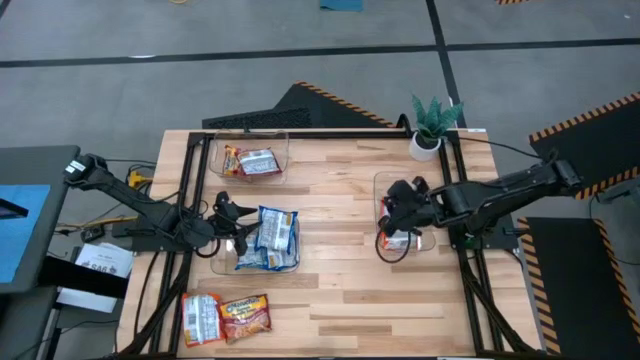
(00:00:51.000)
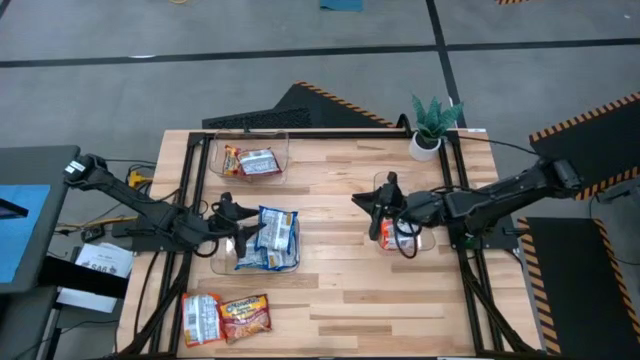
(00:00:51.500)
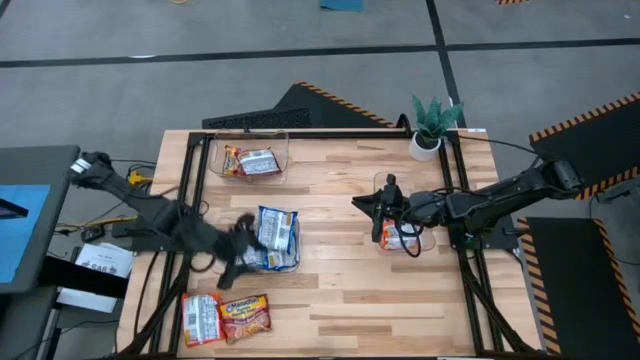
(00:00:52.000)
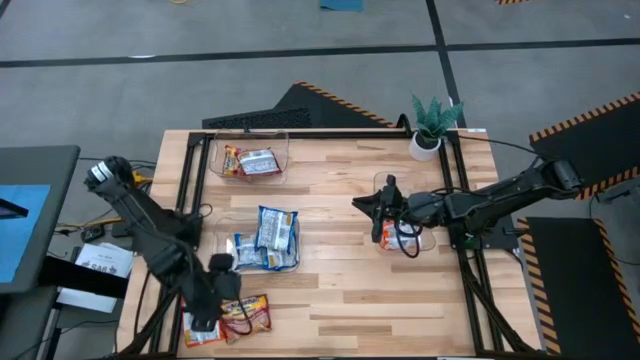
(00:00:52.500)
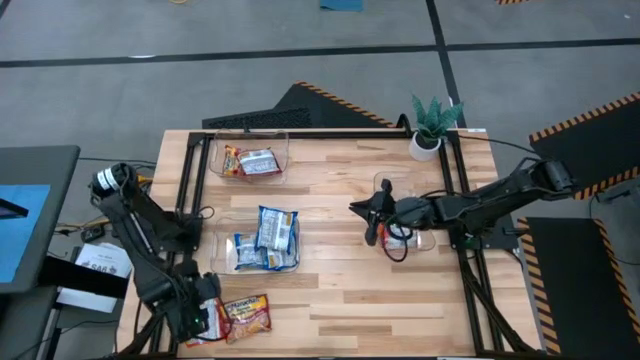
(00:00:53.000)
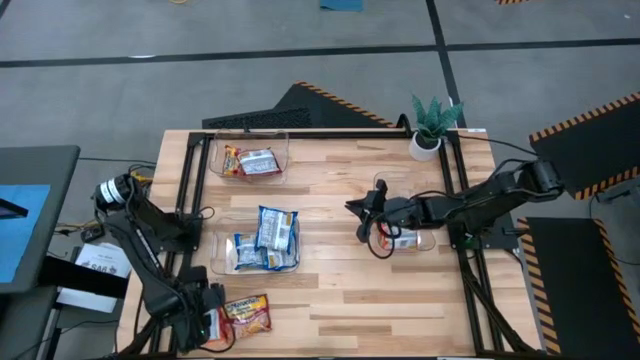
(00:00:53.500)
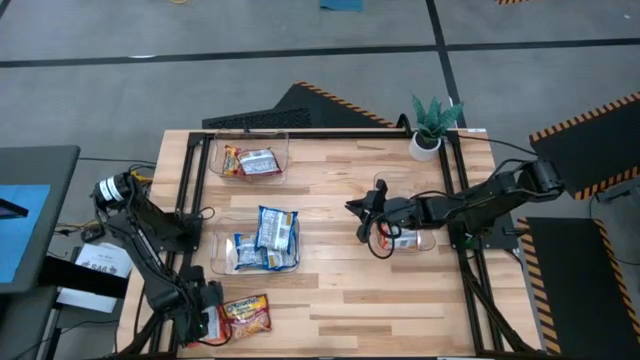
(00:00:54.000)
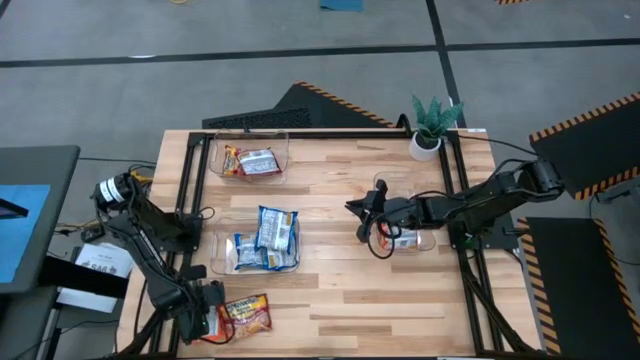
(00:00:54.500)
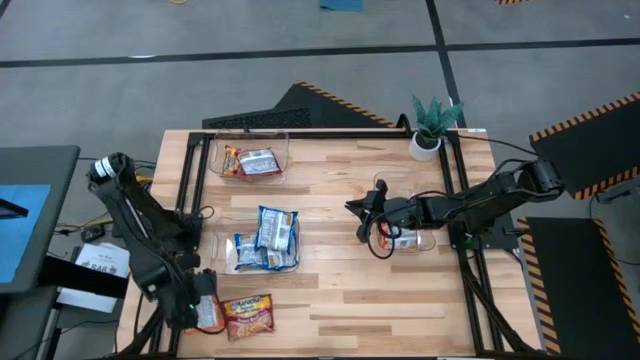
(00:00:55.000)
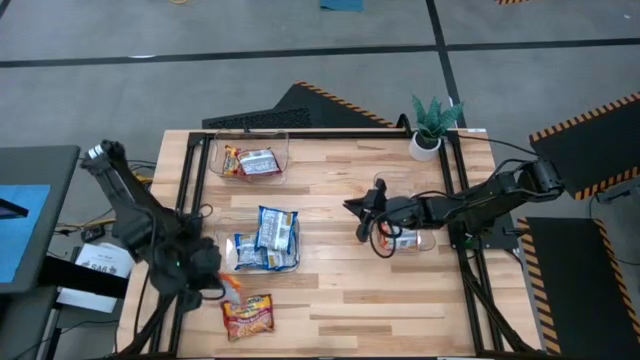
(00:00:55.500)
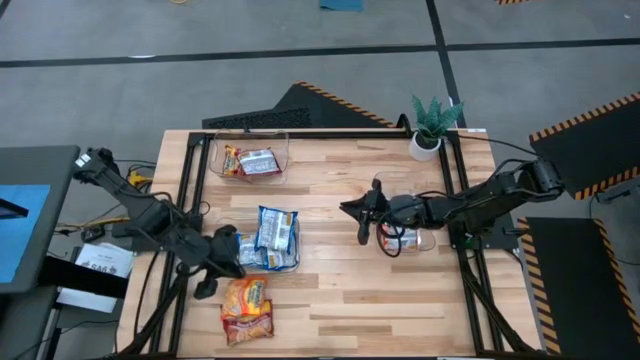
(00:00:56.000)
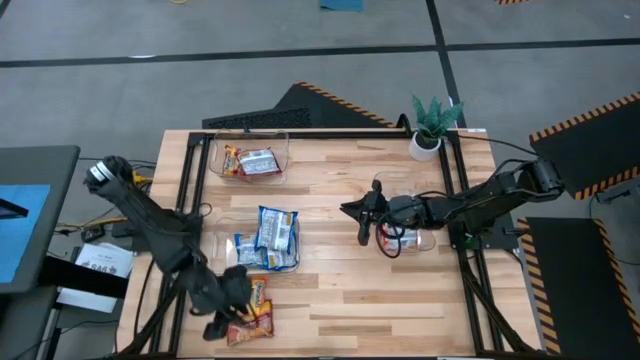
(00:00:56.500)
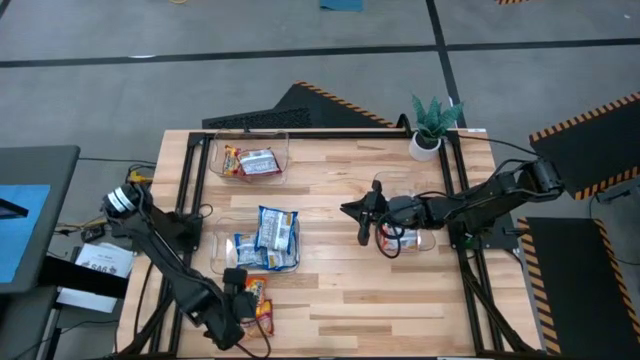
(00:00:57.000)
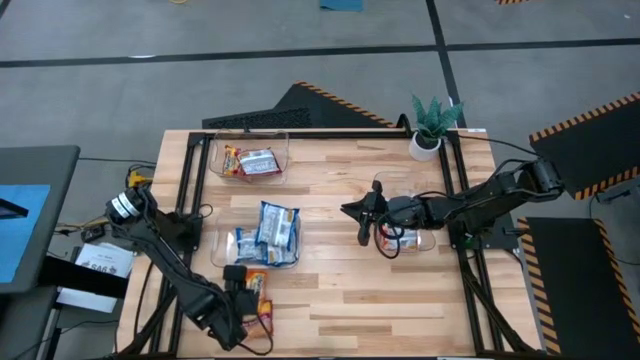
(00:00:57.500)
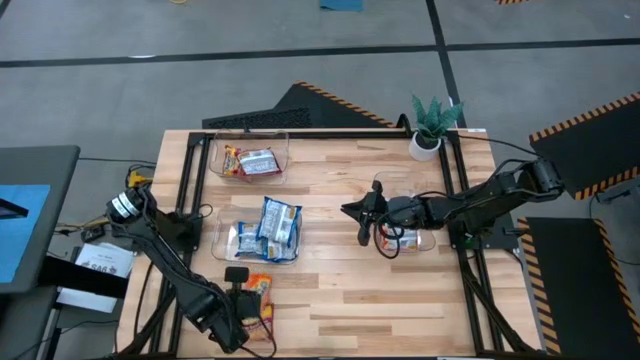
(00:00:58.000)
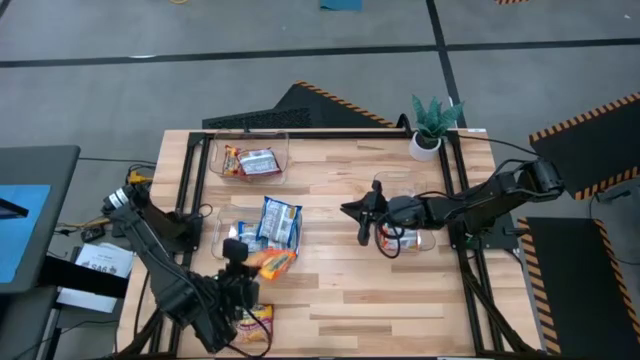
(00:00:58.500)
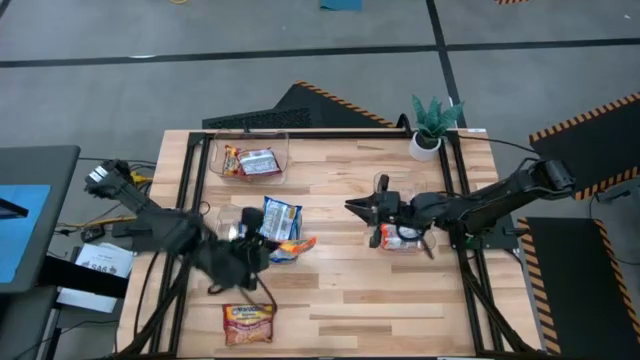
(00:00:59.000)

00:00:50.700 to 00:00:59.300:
Task: Sort Maruchan noodles
Put the orange noodle pack into the bottom right transparent bin

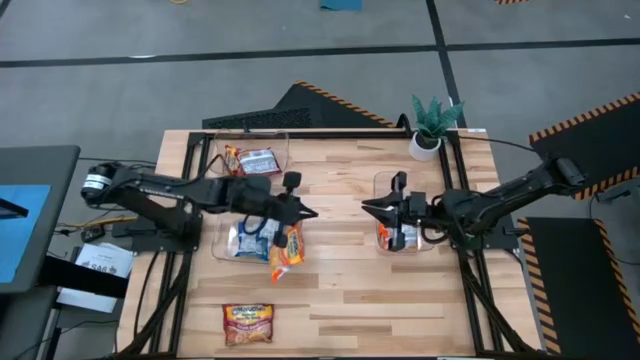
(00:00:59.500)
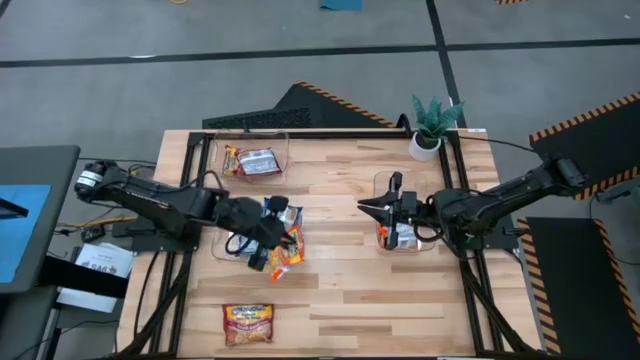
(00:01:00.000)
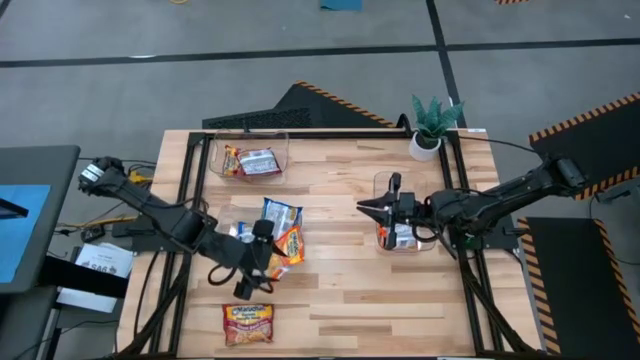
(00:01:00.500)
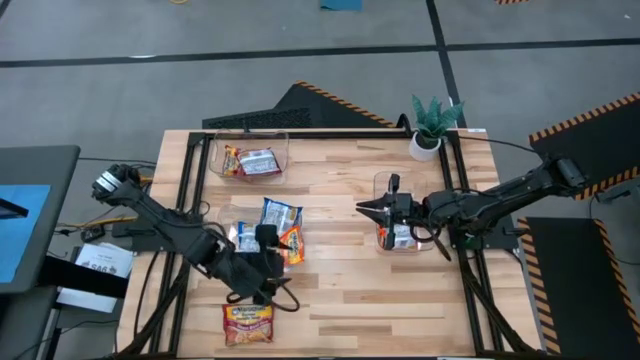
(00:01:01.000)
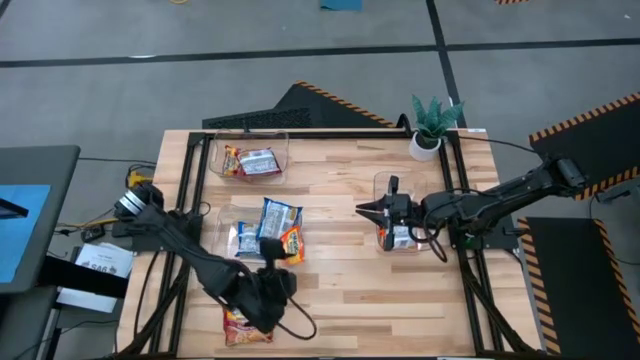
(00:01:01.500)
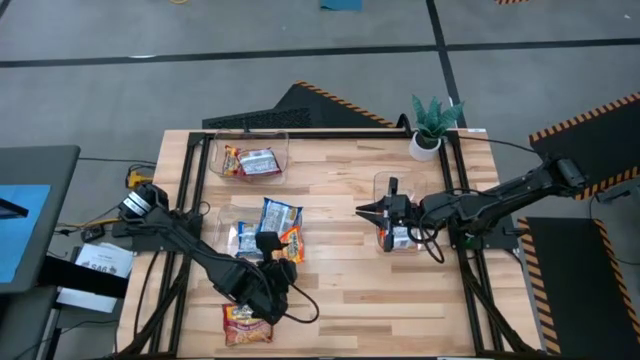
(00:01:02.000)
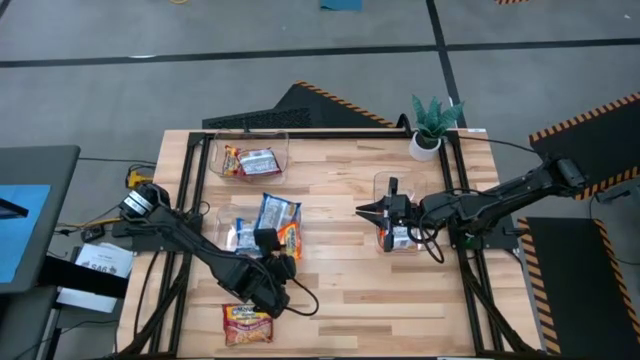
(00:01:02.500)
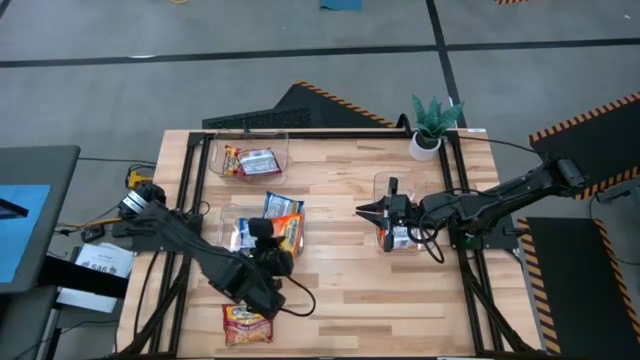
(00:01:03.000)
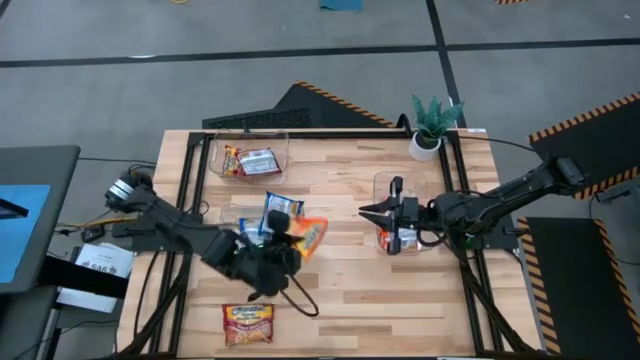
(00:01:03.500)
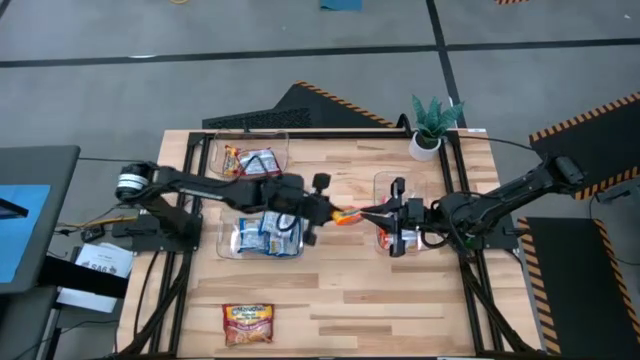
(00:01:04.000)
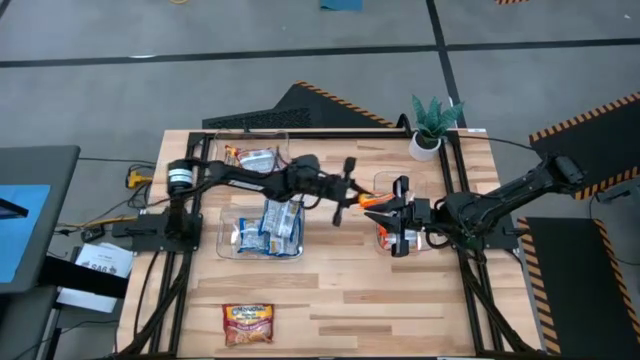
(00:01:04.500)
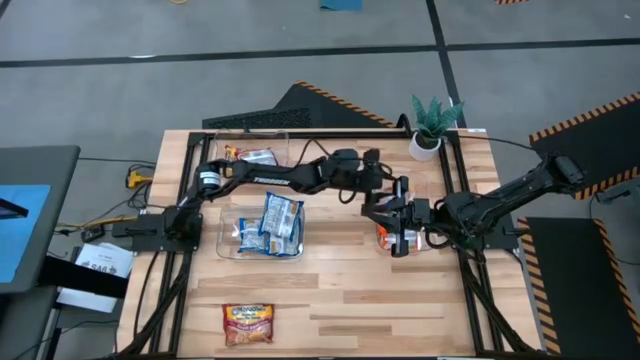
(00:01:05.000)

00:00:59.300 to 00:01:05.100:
Put the orange noodle pack into the bottom right transparent bin

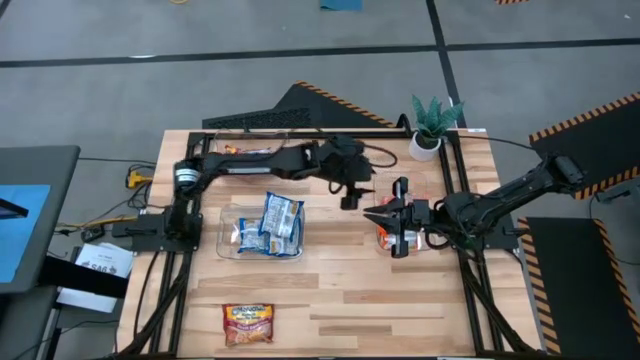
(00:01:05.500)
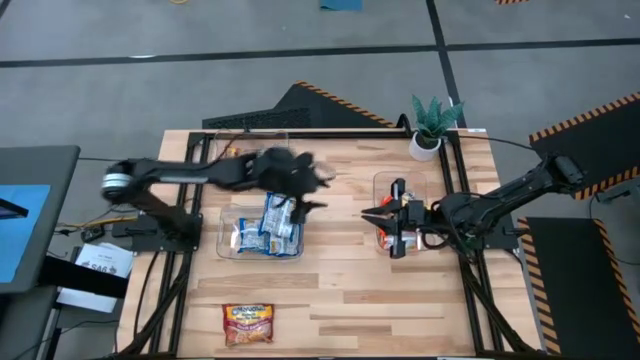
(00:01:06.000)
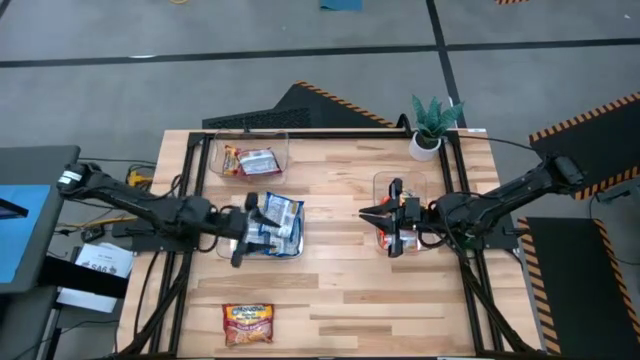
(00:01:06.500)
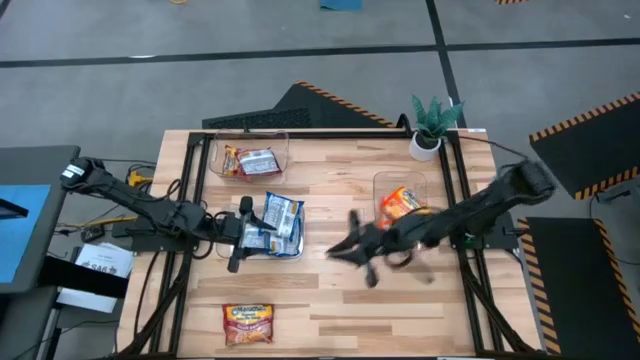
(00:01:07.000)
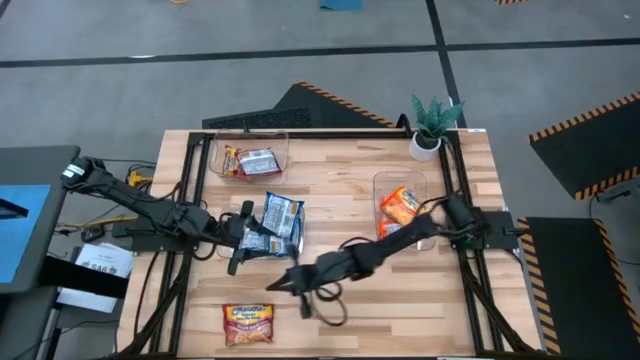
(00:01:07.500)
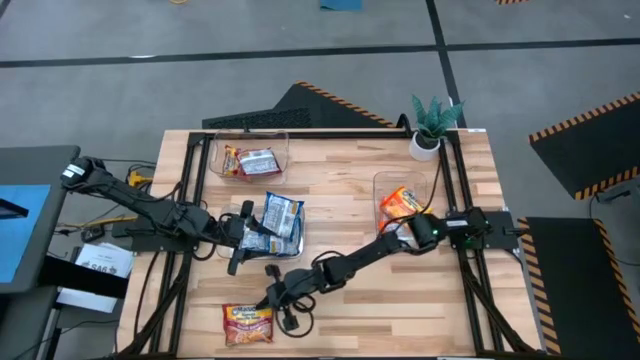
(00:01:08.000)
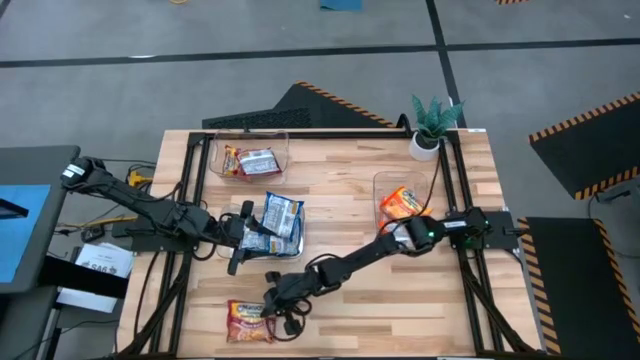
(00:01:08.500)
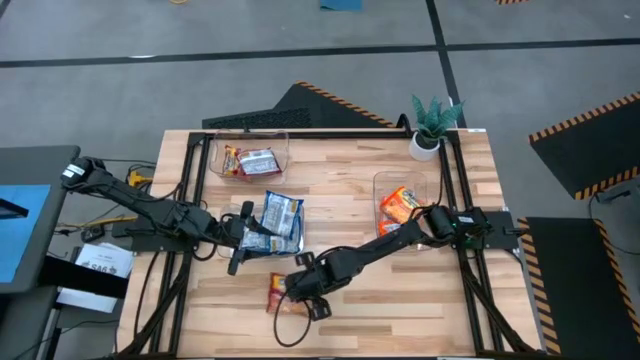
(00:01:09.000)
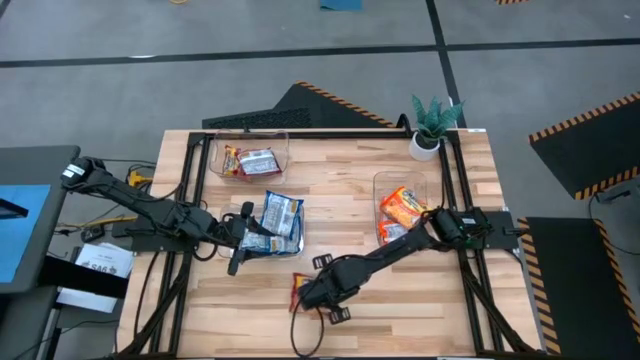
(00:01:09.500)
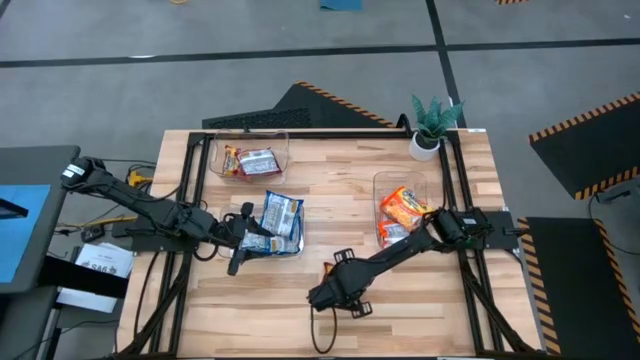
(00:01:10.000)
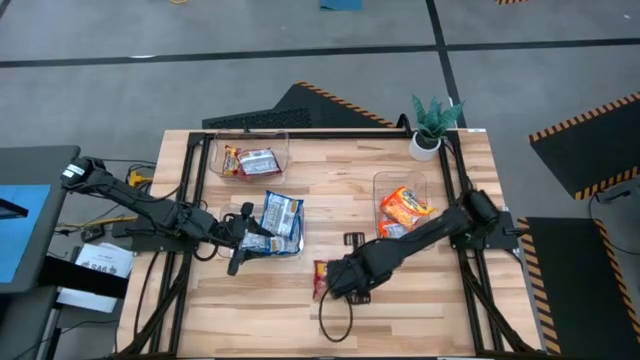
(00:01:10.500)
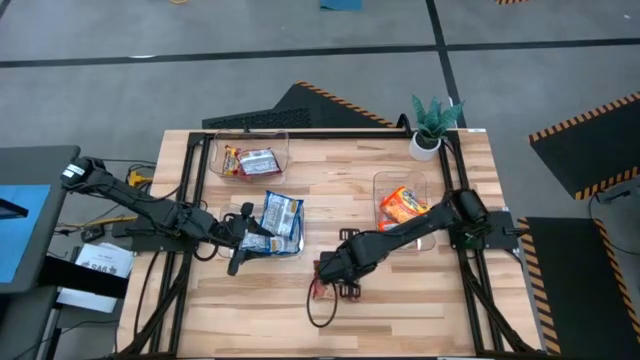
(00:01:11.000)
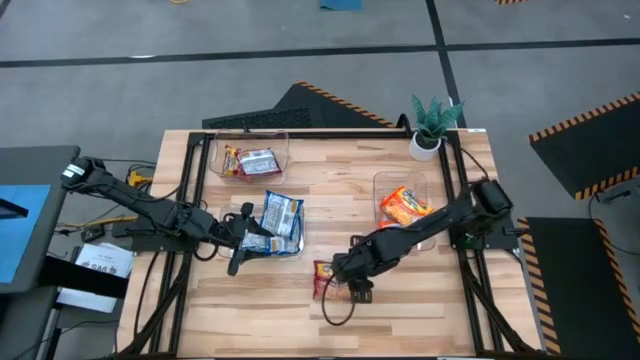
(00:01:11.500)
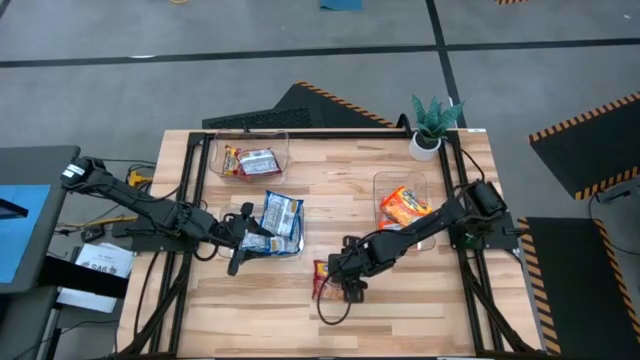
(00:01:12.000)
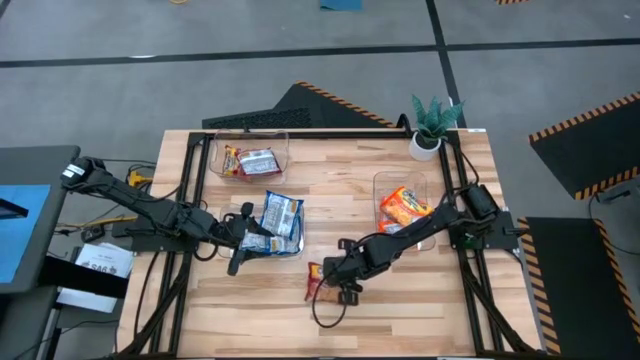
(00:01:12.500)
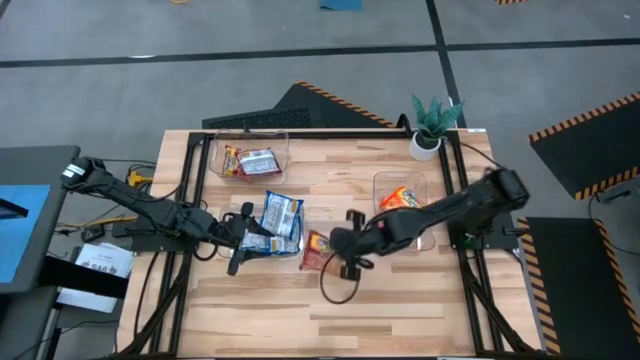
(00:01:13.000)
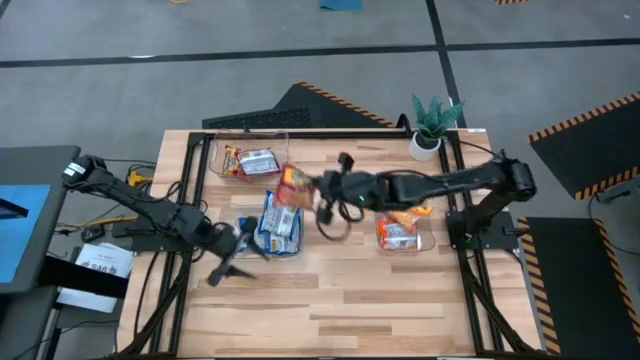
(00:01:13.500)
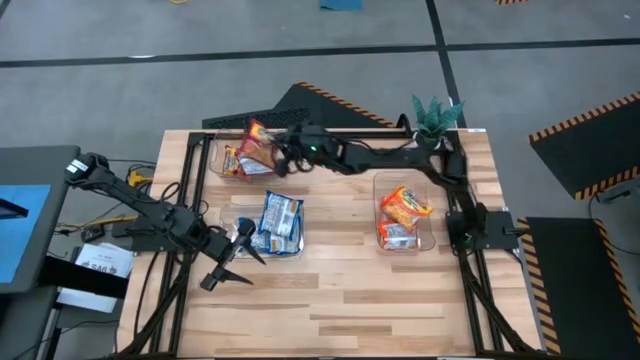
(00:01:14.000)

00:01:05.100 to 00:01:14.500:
Put the red noodle pack into the top transparent bin
